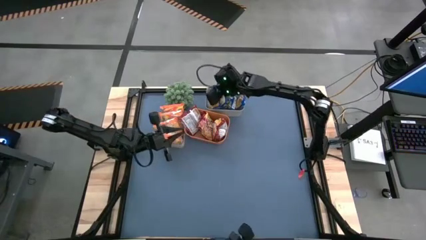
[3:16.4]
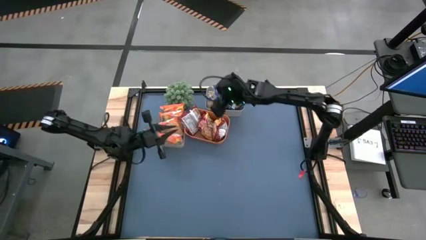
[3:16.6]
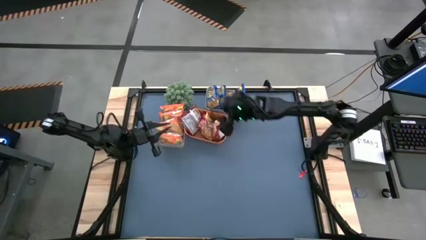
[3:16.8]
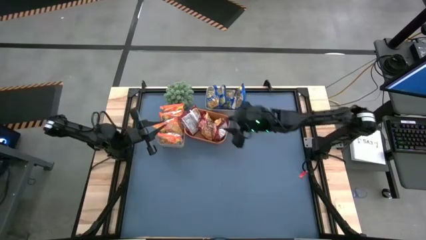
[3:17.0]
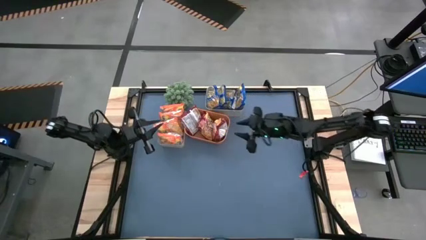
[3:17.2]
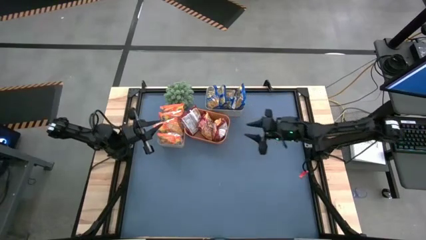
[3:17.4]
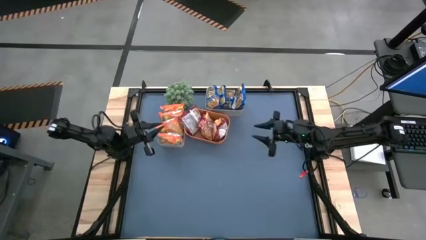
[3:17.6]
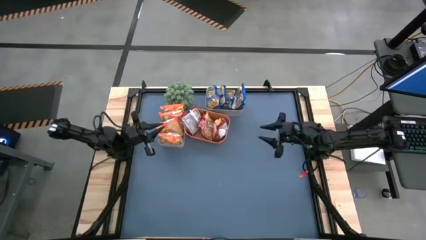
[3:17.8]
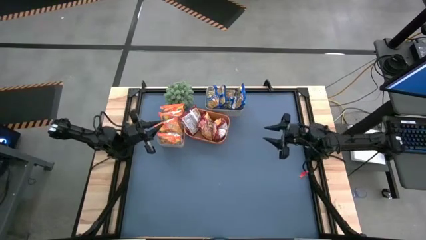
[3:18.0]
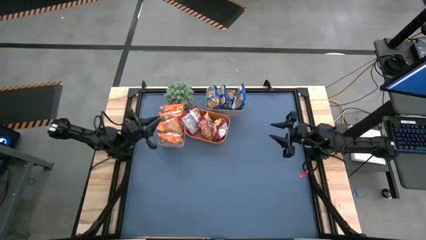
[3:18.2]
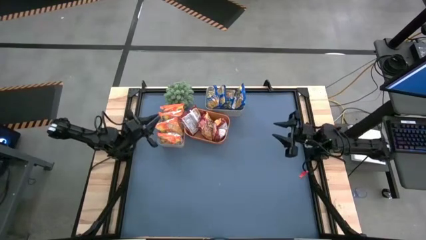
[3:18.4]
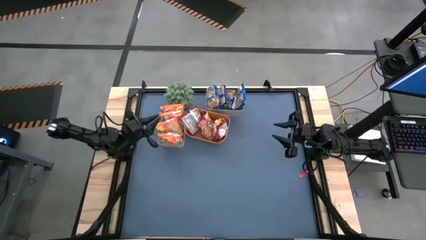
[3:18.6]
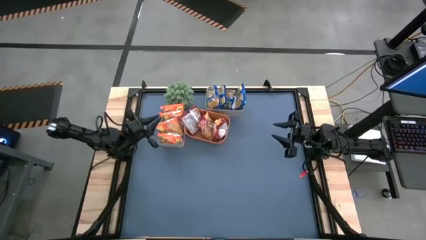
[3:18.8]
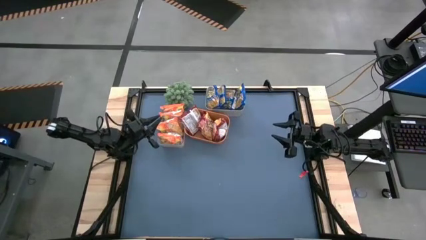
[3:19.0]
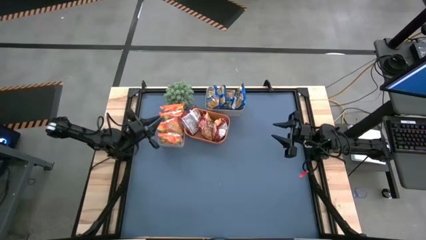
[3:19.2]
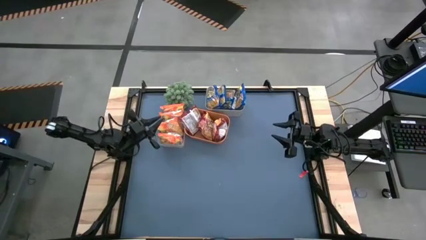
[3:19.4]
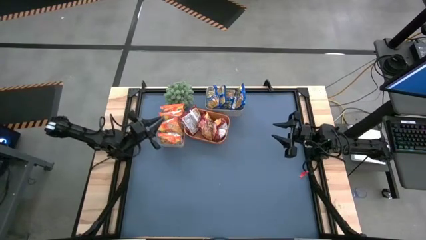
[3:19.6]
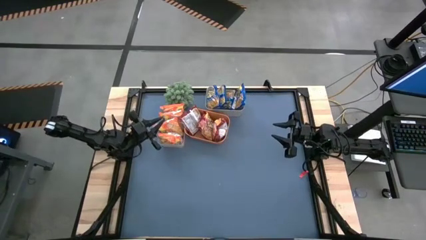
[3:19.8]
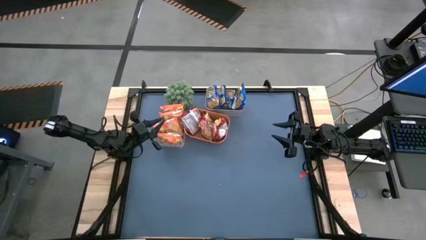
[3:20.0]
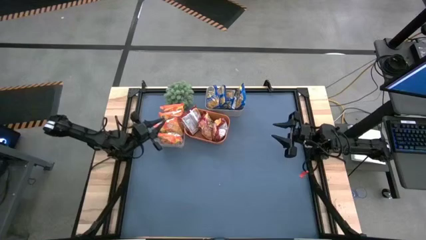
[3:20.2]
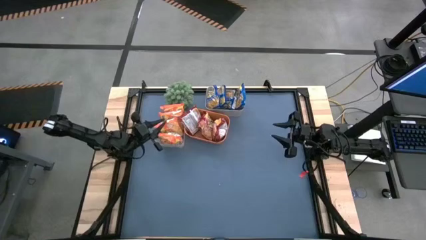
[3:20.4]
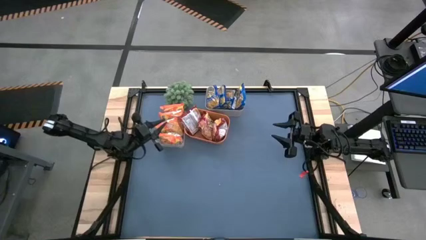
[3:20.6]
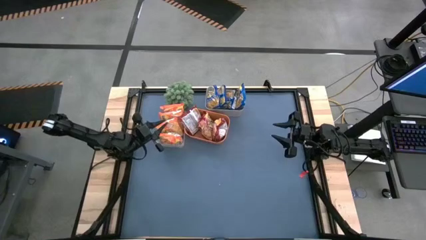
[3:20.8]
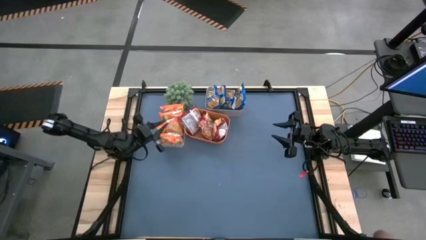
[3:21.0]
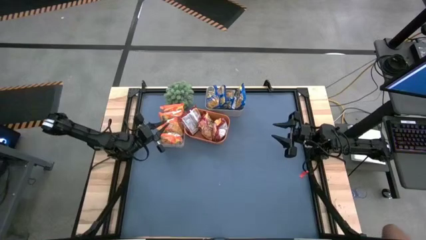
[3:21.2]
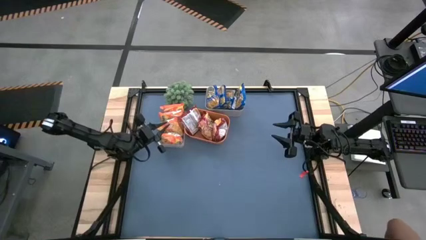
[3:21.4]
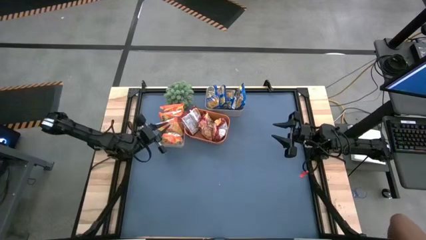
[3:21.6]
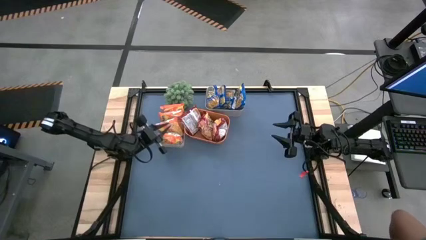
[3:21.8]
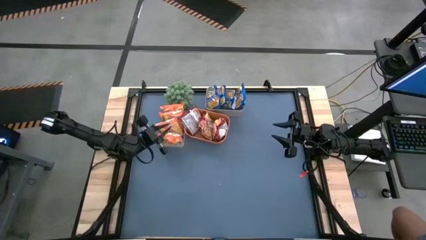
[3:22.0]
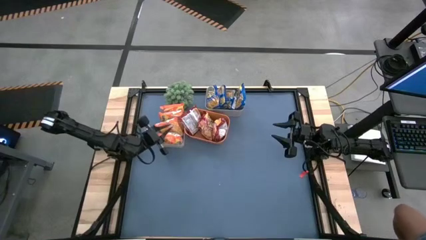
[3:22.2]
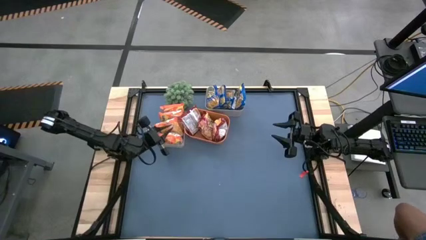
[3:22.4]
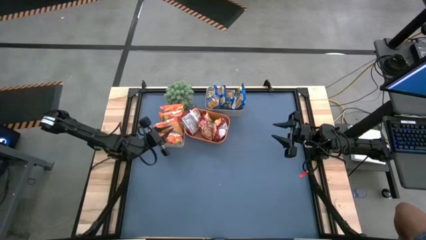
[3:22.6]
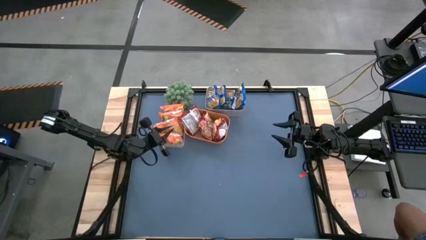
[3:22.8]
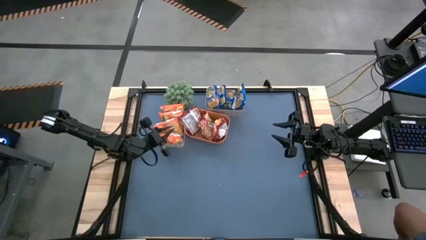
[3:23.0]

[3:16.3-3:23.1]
Task: Sort Maruchan noodles
Return to Home Position

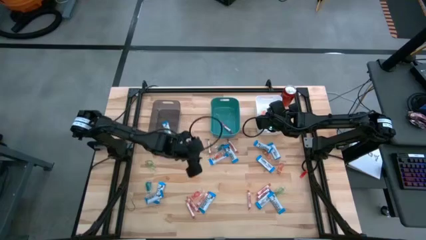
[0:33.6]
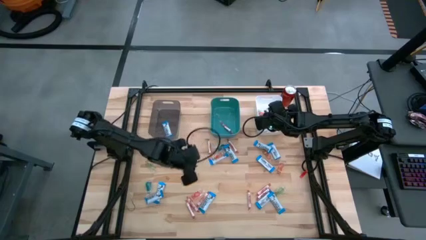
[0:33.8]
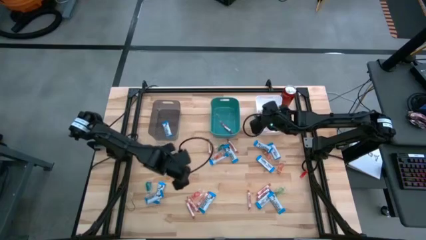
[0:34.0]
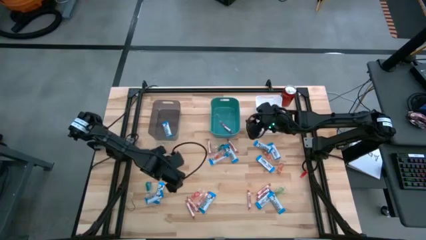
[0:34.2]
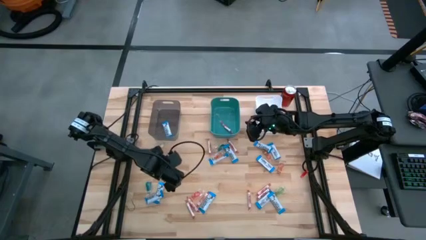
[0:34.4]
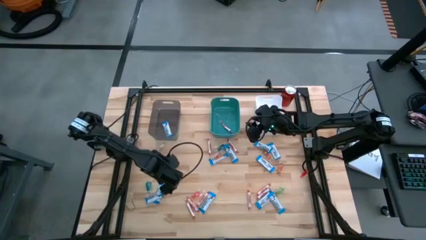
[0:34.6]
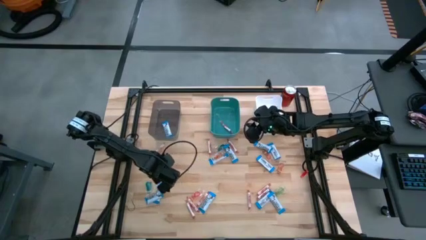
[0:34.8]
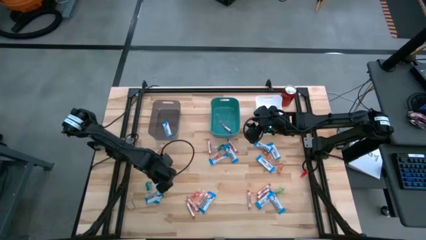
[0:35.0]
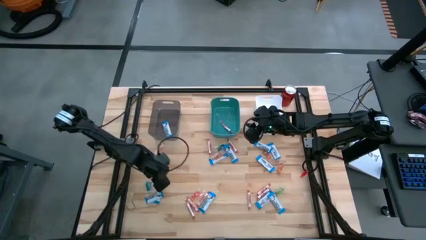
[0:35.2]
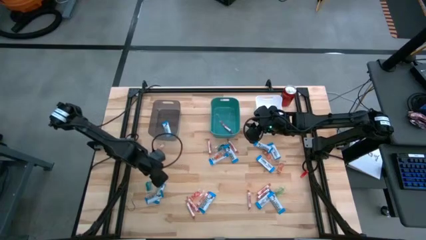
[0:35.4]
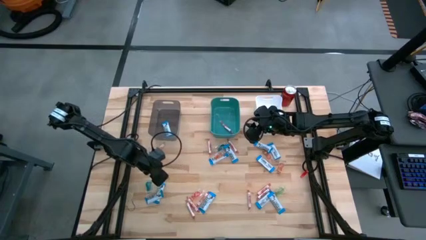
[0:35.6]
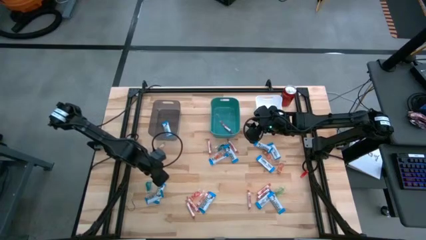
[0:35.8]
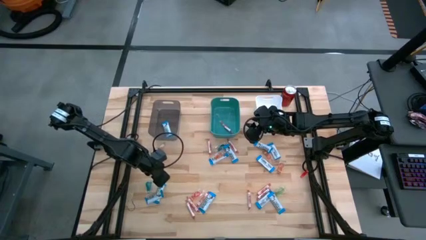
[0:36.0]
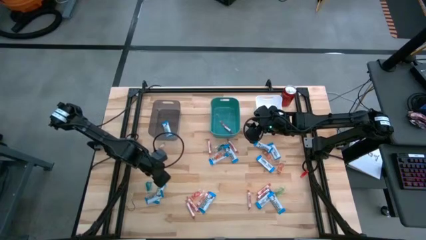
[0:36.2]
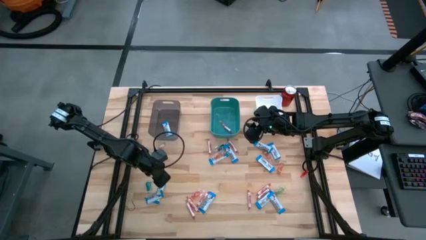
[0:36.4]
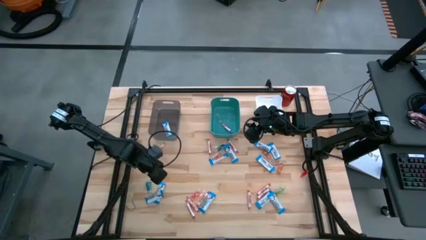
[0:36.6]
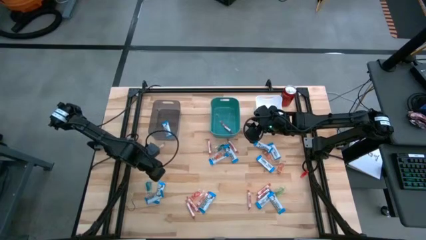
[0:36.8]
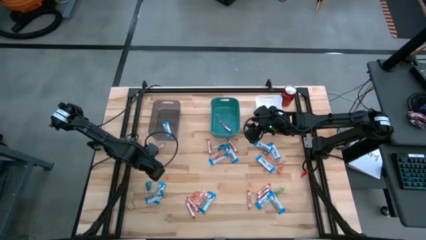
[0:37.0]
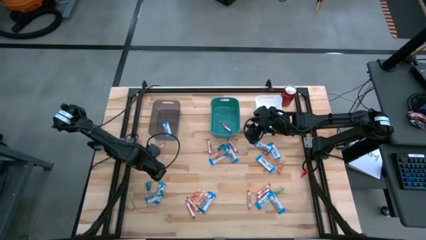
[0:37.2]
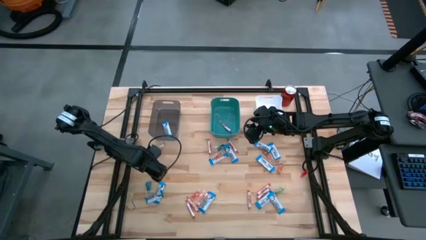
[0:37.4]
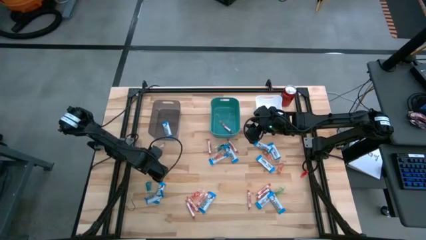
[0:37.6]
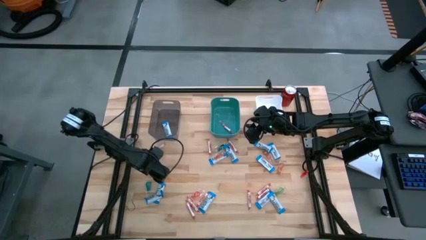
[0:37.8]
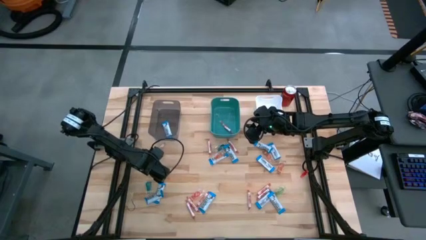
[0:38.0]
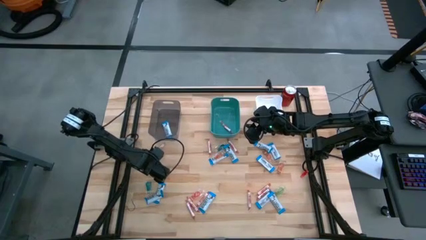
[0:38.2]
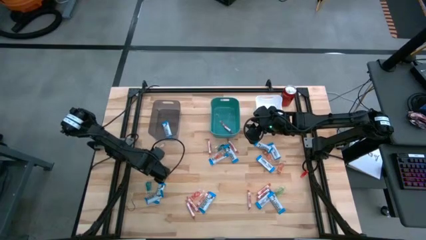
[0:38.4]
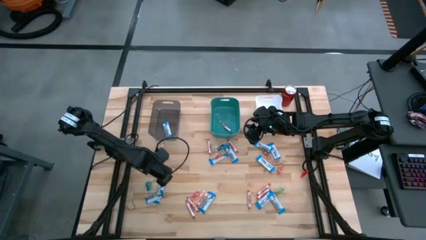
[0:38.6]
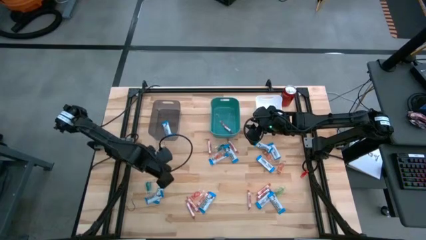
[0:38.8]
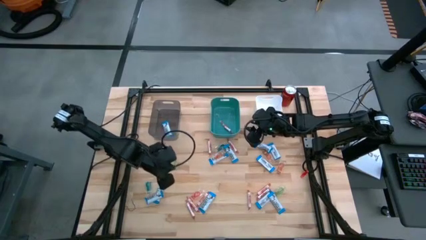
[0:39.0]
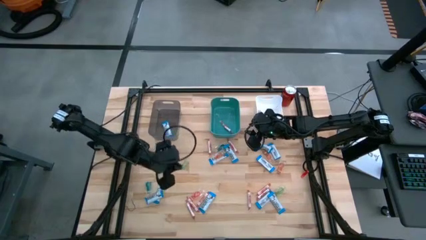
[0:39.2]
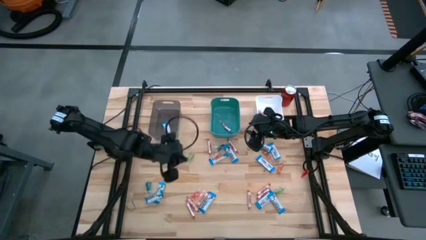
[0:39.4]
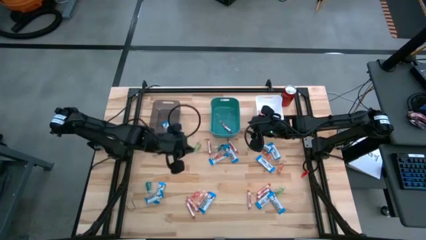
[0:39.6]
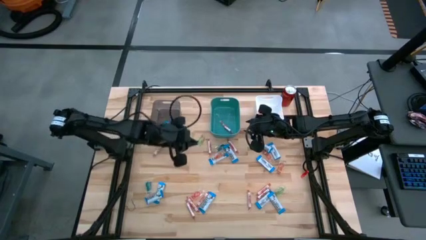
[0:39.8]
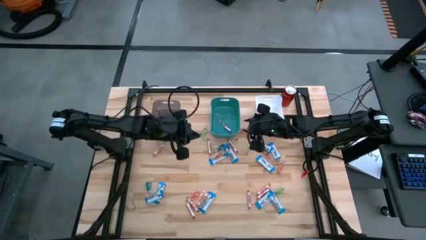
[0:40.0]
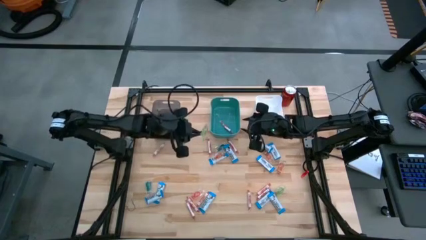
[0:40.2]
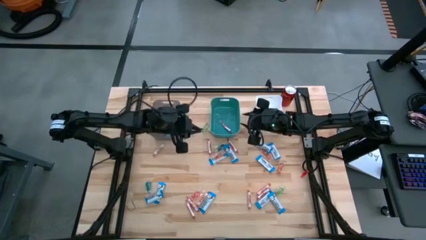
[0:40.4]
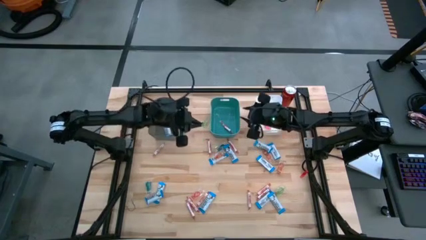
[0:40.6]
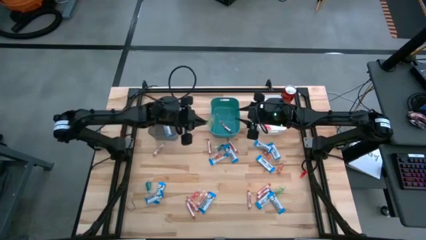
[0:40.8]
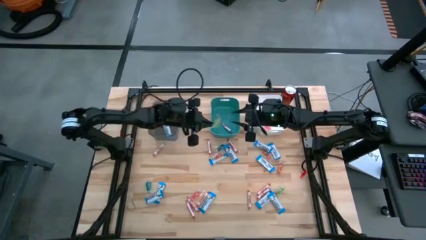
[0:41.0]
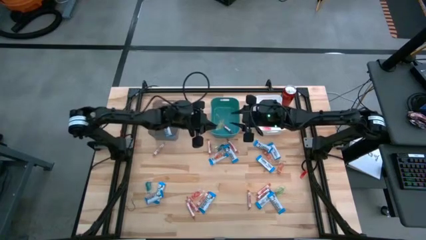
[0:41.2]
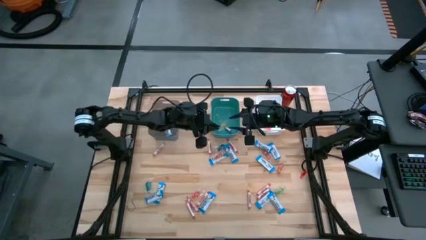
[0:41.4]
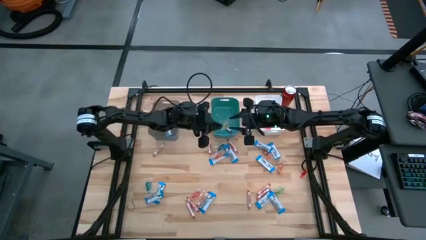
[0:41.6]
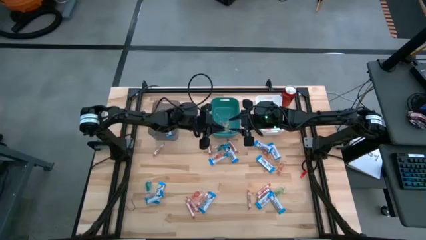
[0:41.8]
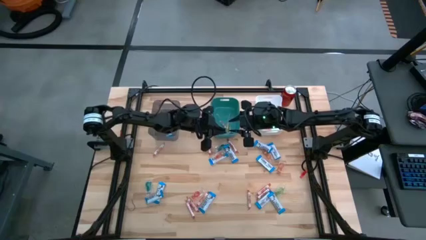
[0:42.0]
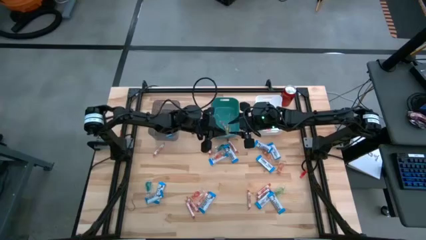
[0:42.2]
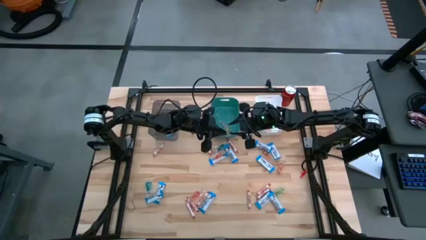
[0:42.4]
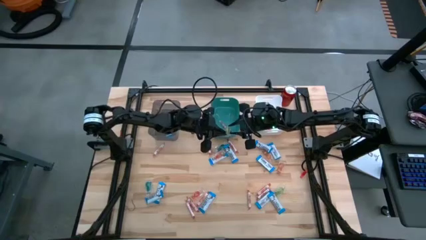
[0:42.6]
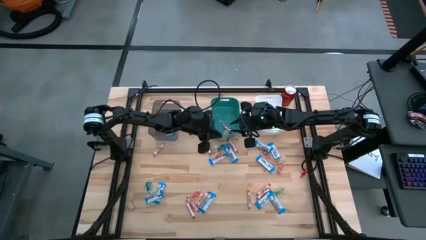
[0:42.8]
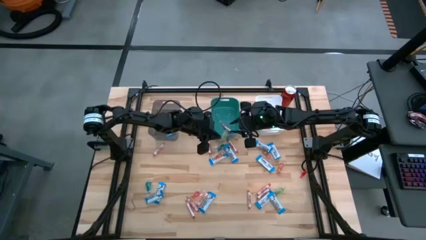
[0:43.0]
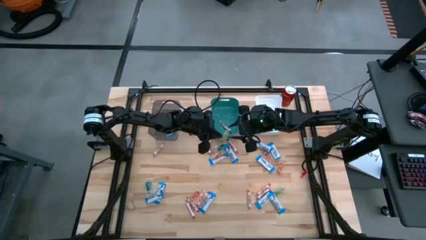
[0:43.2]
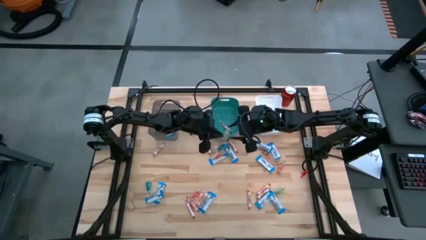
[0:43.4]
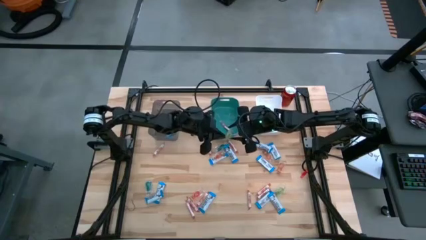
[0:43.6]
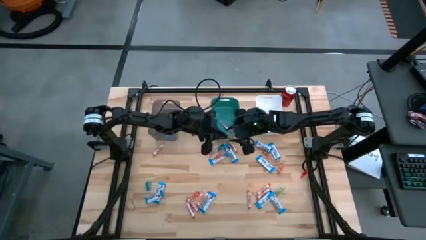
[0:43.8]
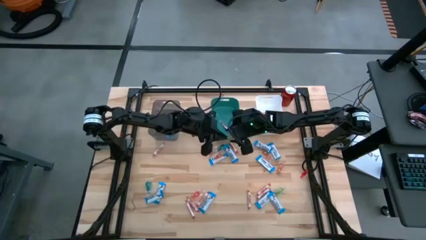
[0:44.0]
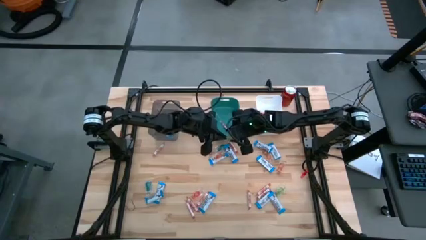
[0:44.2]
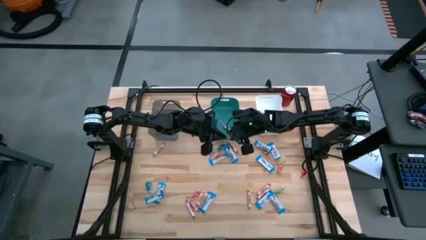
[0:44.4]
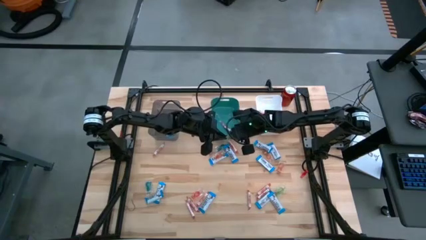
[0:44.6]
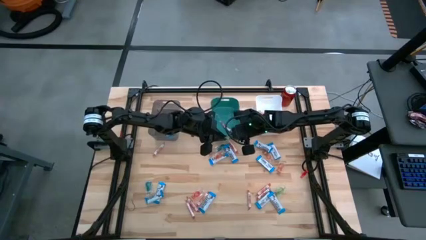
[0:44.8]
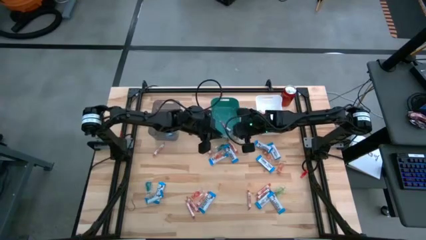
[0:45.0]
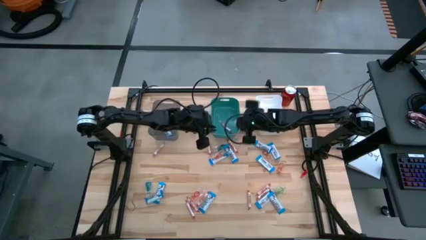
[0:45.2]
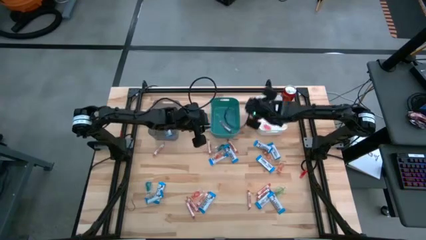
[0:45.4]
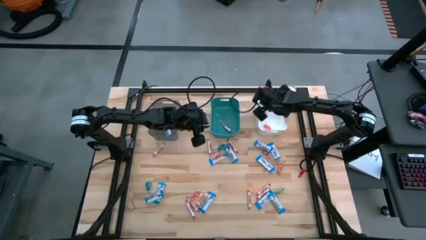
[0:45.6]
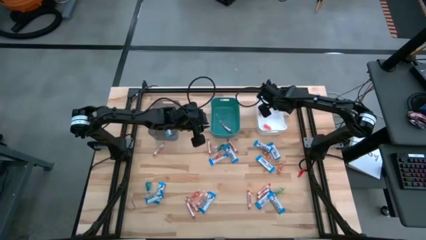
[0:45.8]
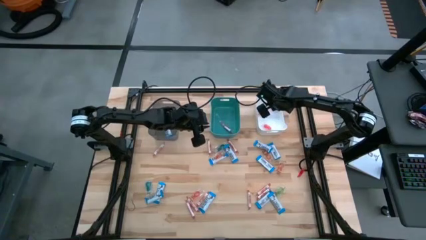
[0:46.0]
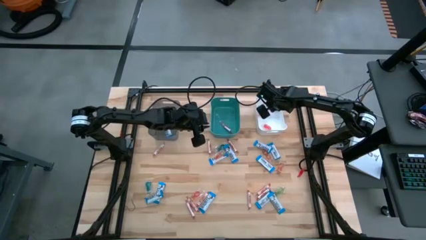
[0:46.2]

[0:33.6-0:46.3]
Task: Sort candy
Put the green gummy into the white bin
